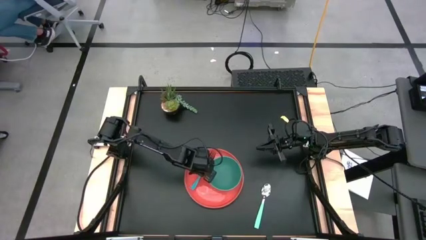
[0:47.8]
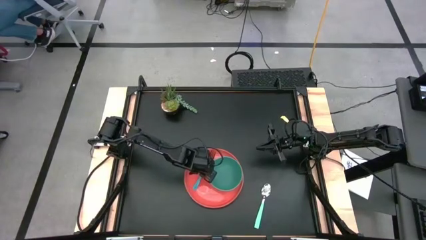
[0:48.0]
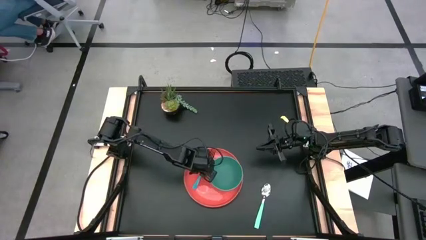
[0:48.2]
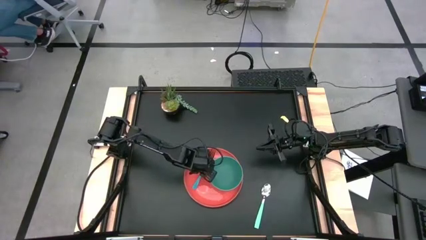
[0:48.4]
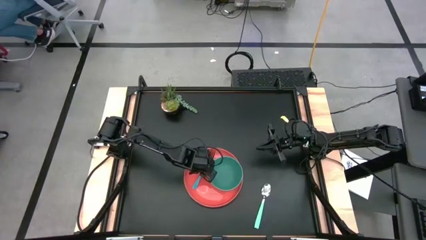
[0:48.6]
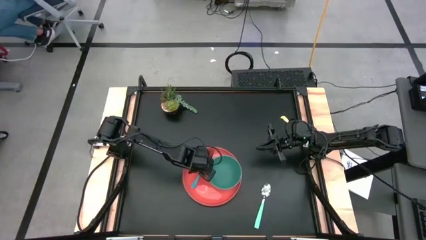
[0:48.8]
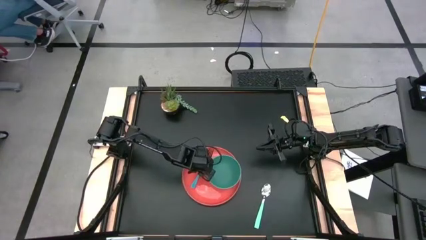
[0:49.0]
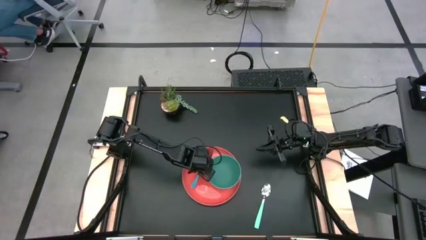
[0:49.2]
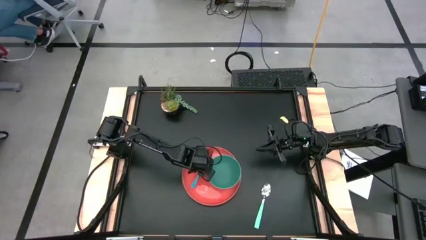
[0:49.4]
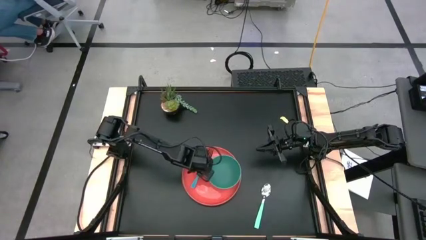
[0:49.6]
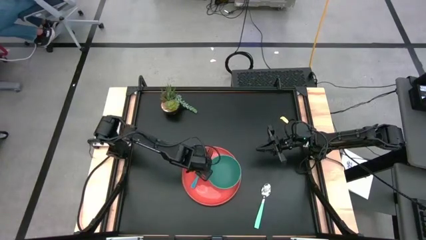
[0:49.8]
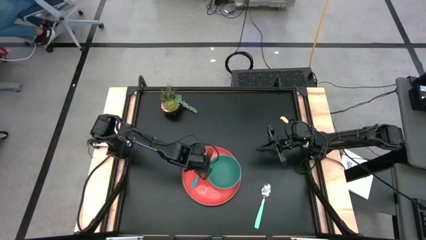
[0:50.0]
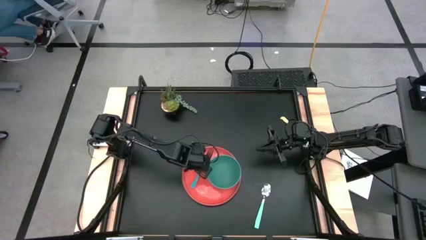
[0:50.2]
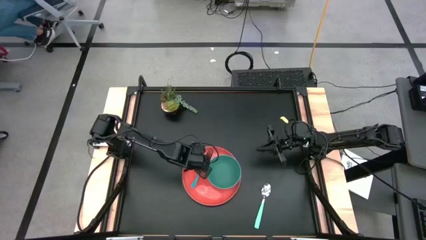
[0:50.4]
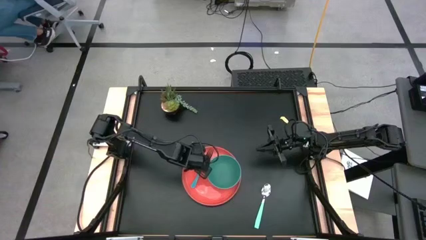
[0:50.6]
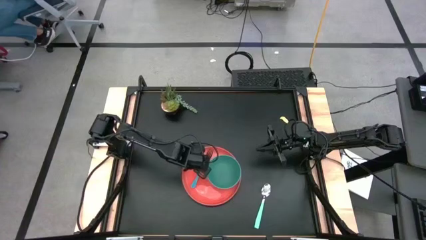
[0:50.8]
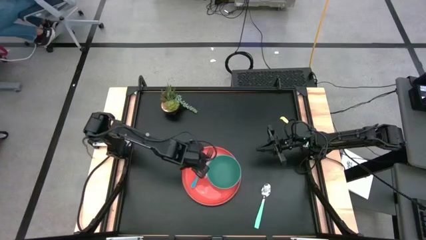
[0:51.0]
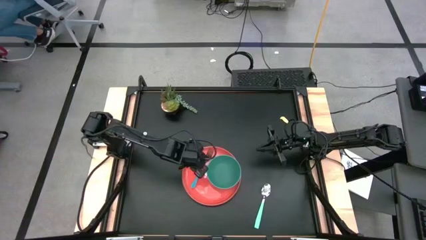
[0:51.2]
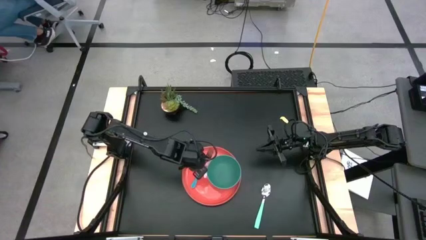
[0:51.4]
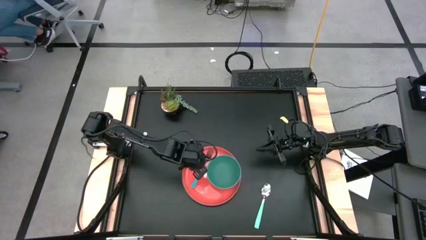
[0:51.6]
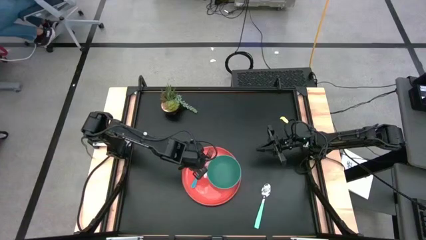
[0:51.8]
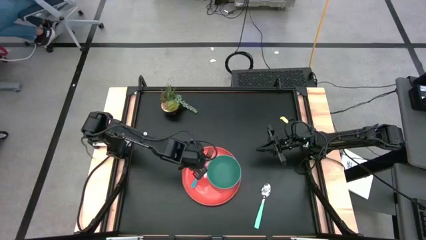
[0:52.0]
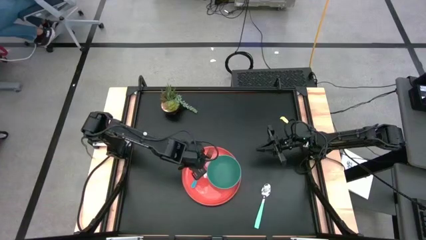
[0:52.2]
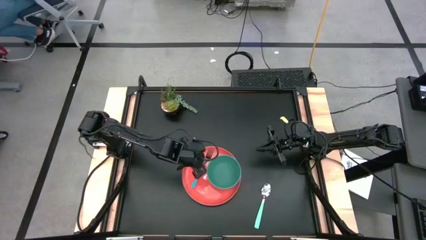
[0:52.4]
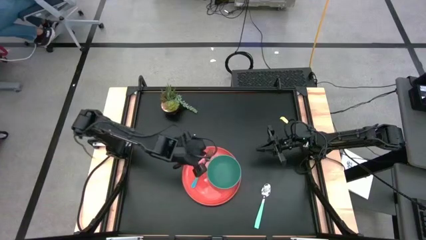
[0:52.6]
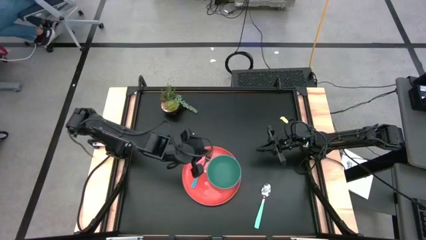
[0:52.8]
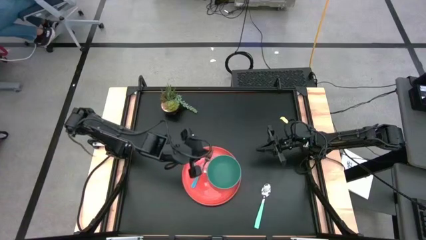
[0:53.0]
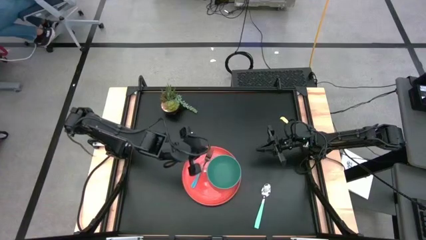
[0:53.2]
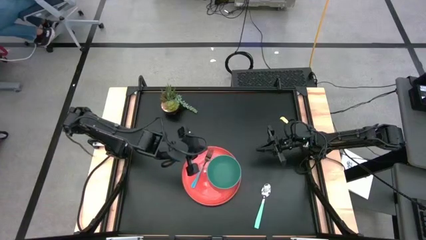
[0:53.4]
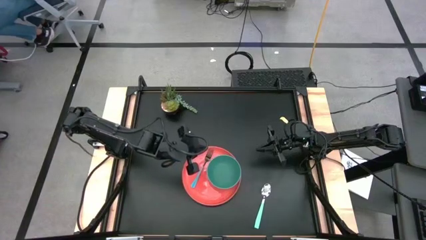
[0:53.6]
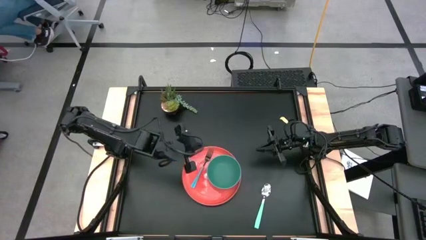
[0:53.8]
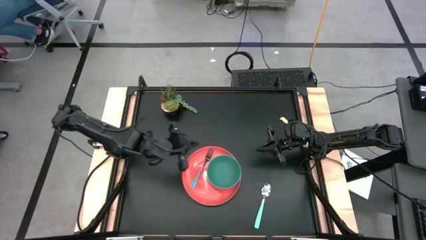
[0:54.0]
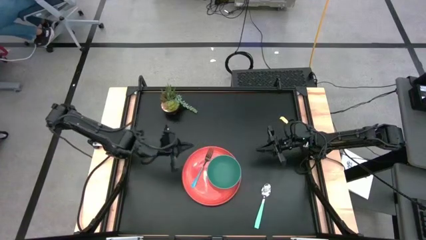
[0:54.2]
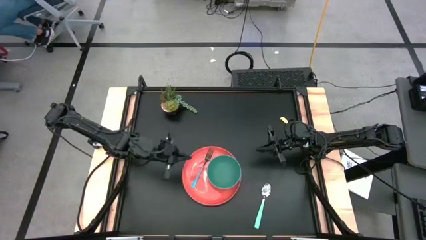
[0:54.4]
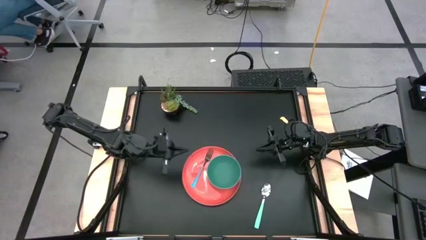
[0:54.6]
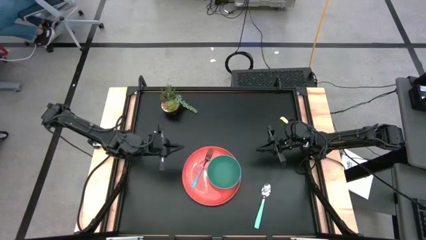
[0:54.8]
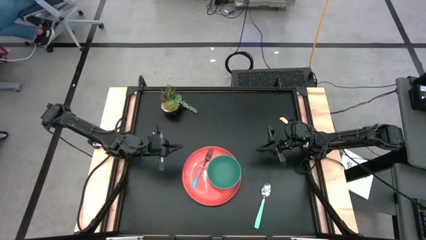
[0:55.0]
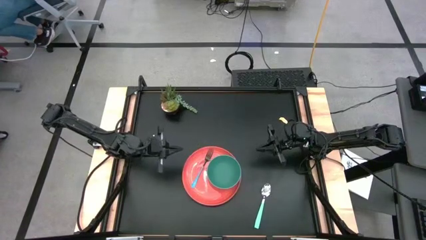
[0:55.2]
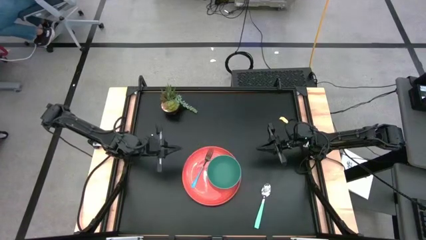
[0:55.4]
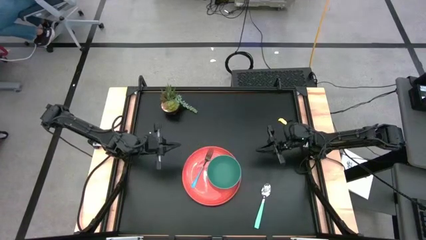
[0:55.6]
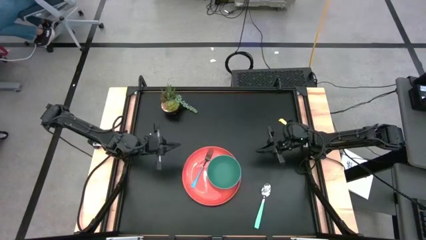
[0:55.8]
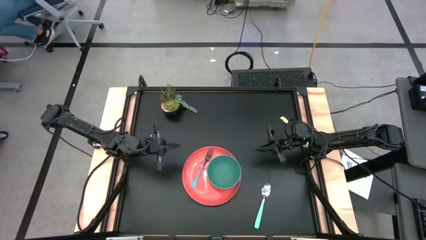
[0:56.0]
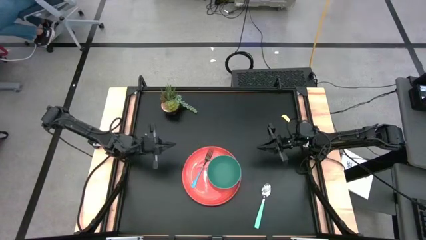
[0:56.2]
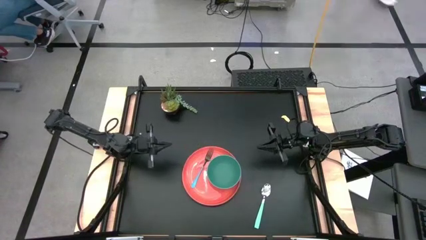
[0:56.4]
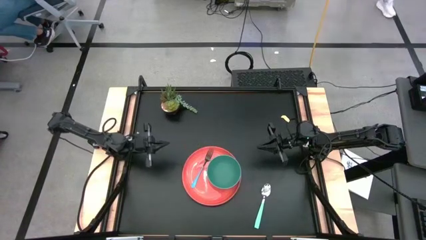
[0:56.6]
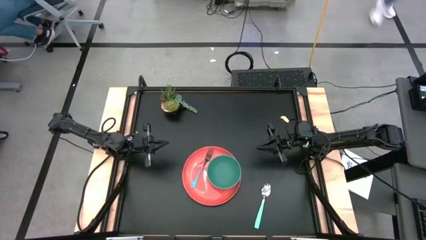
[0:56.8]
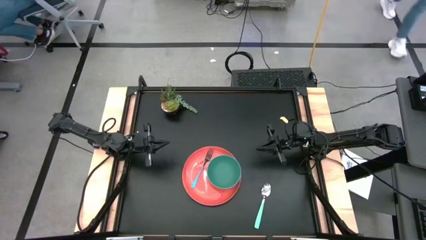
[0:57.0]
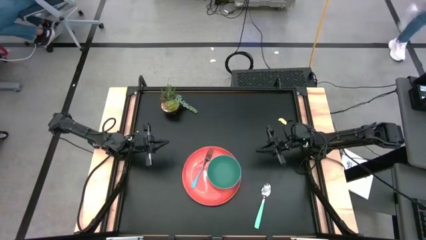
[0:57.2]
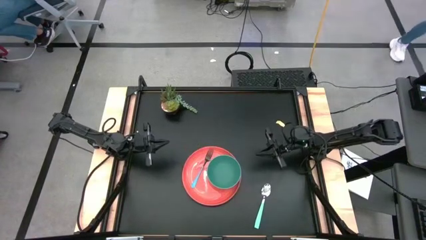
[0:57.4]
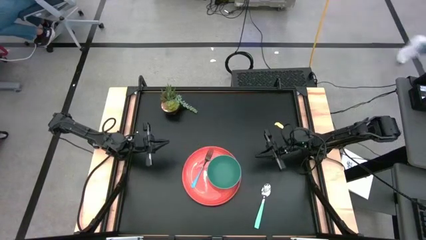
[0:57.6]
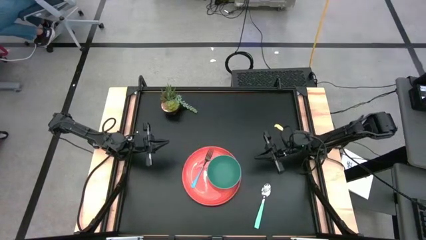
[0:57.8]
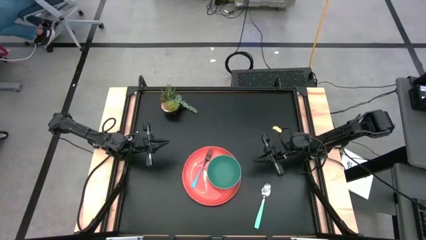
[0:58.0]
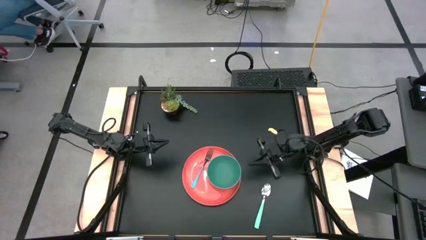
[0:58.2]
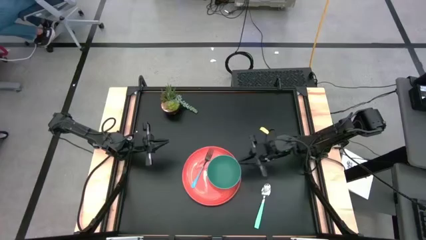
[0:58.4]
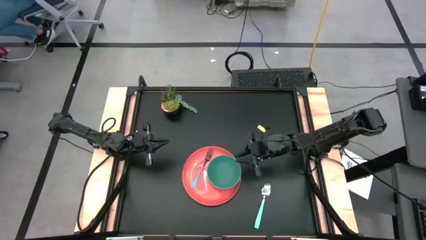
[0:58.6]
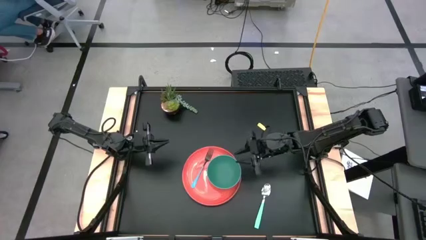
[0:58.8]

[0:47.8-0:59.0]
Task: Set table place
Adjust the green bowl on the orange plate
